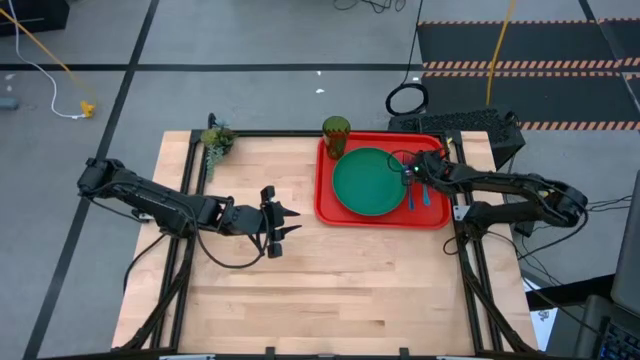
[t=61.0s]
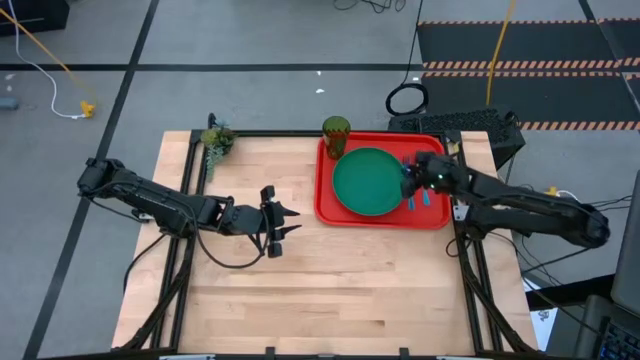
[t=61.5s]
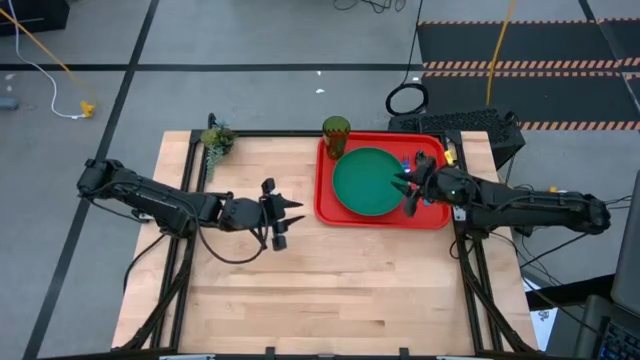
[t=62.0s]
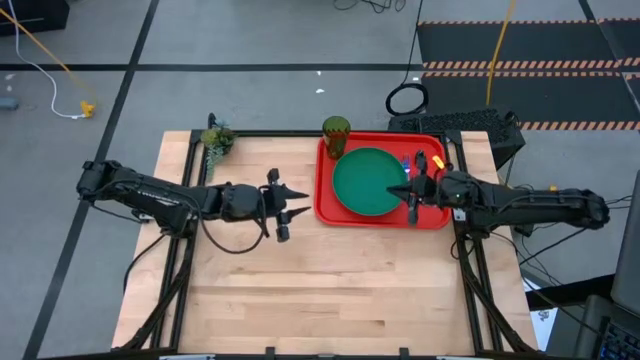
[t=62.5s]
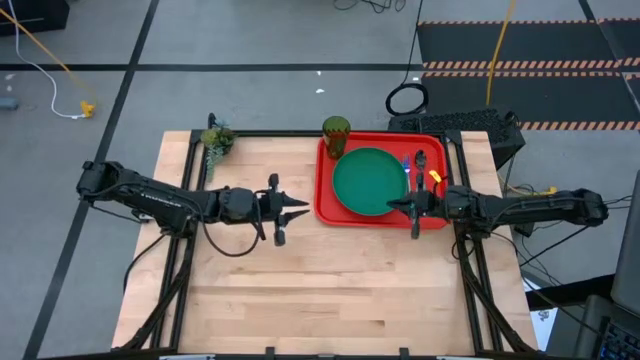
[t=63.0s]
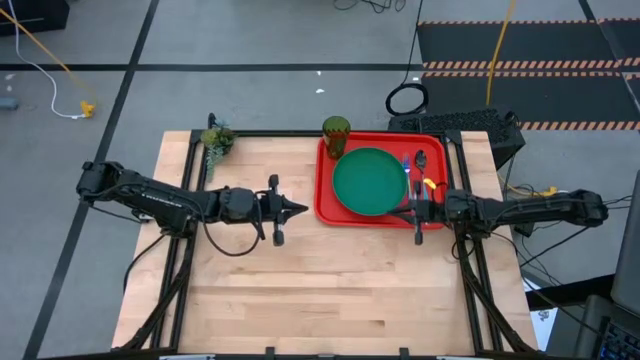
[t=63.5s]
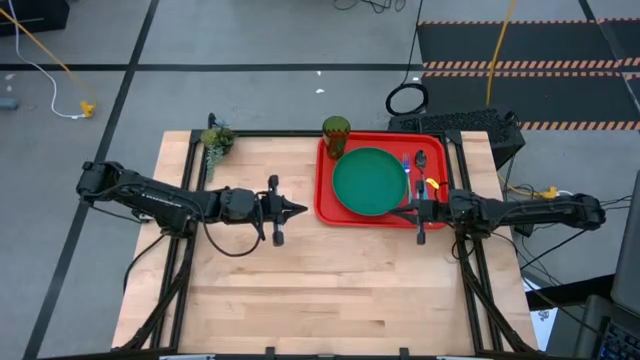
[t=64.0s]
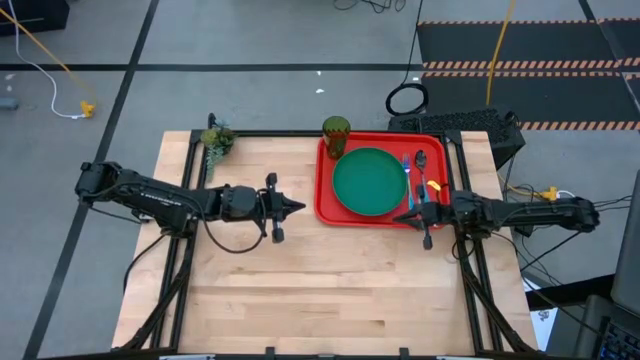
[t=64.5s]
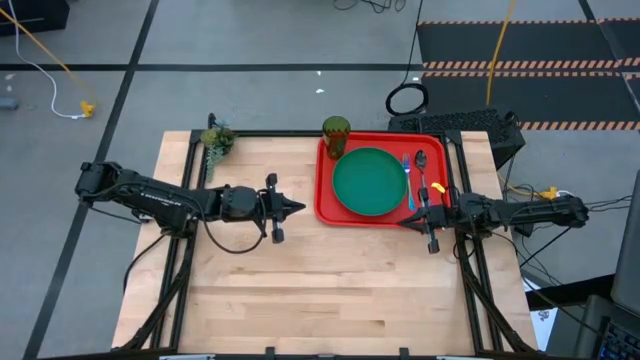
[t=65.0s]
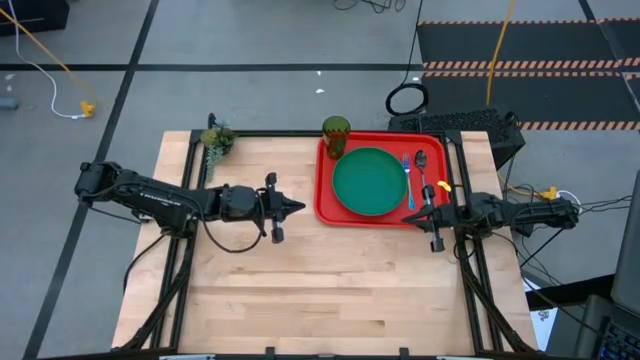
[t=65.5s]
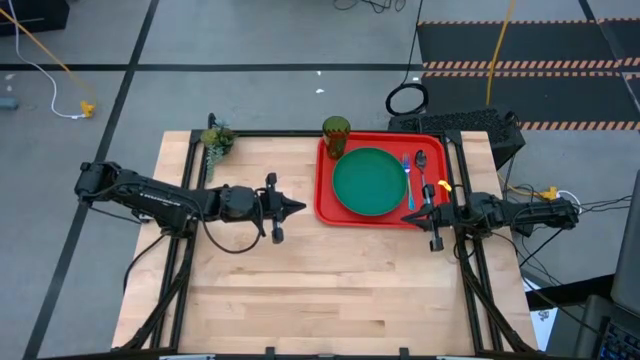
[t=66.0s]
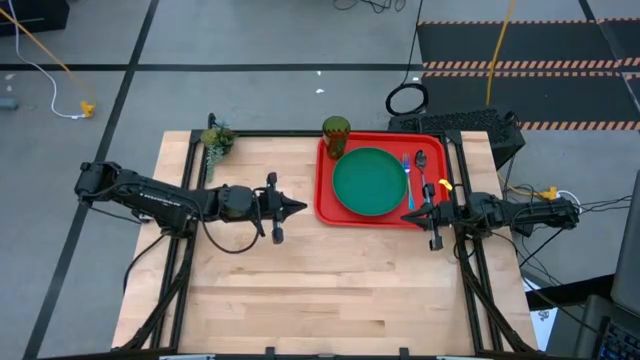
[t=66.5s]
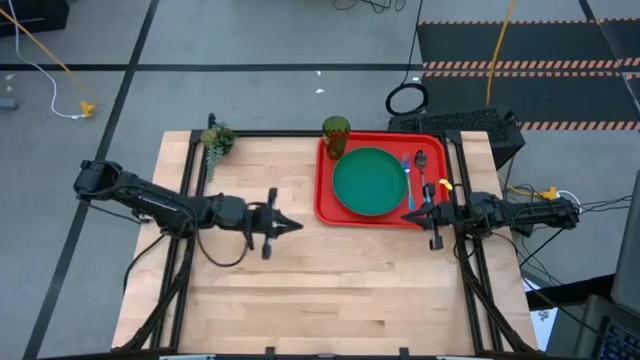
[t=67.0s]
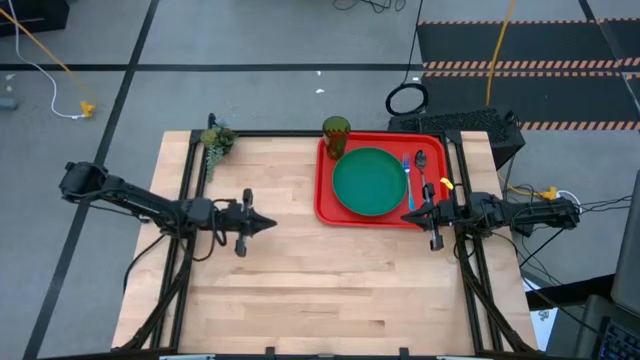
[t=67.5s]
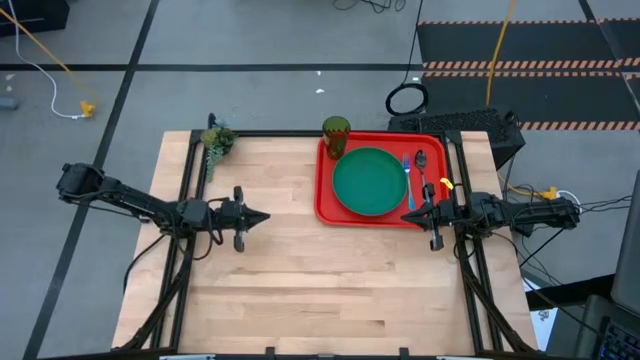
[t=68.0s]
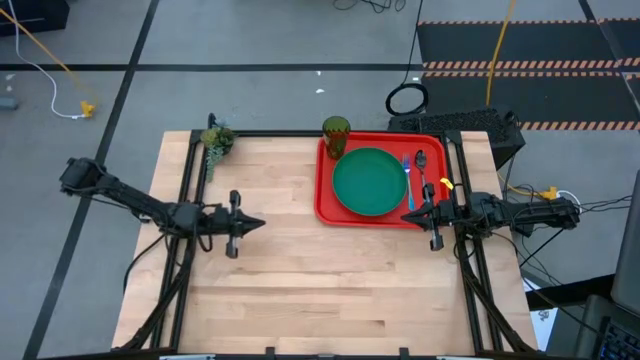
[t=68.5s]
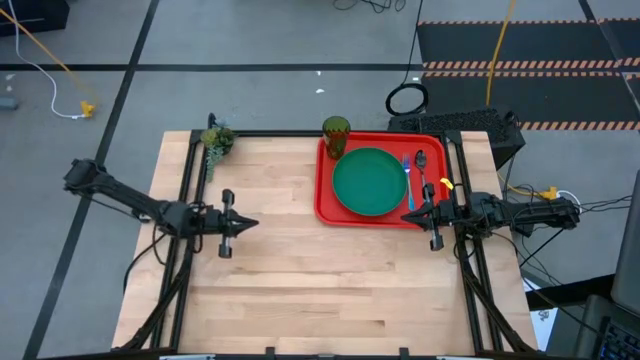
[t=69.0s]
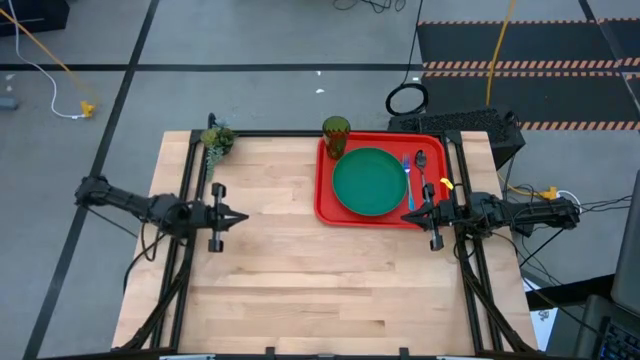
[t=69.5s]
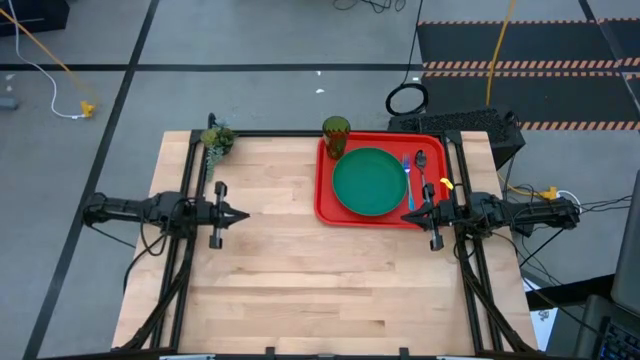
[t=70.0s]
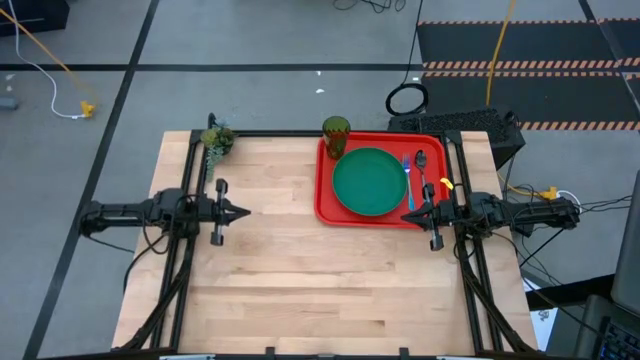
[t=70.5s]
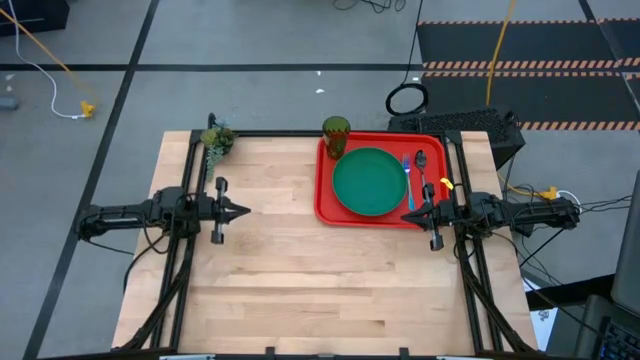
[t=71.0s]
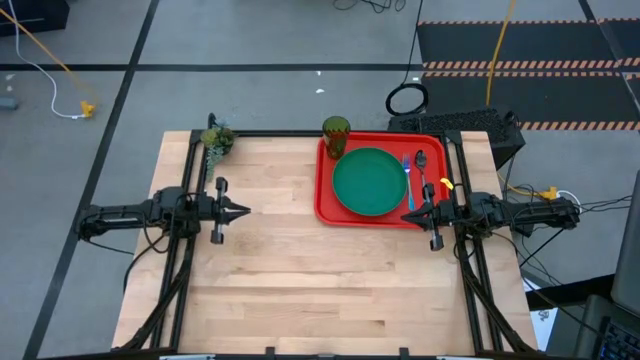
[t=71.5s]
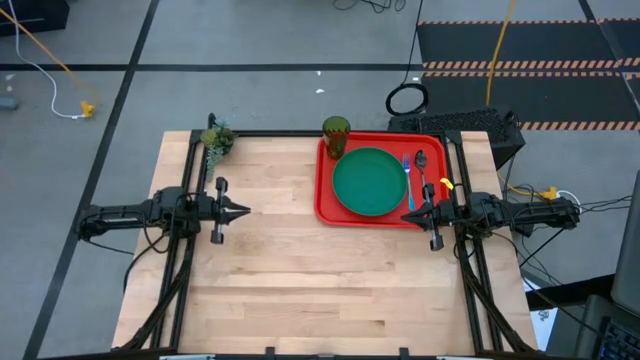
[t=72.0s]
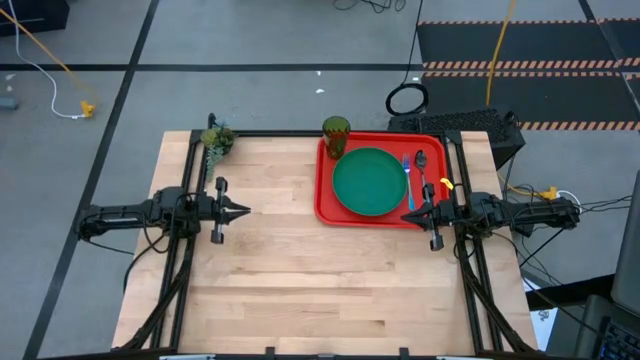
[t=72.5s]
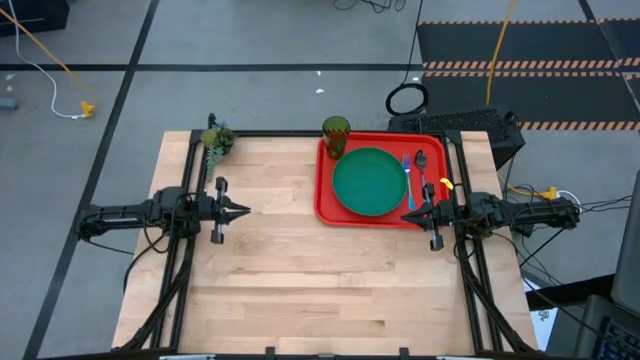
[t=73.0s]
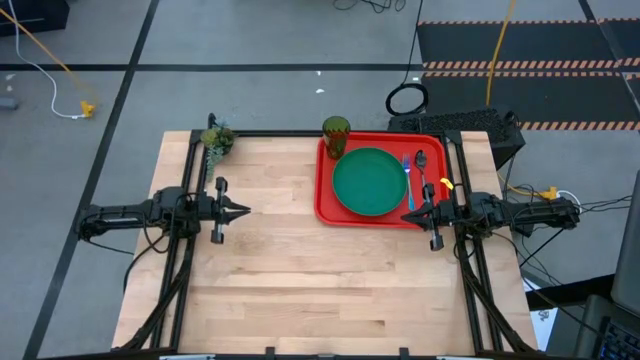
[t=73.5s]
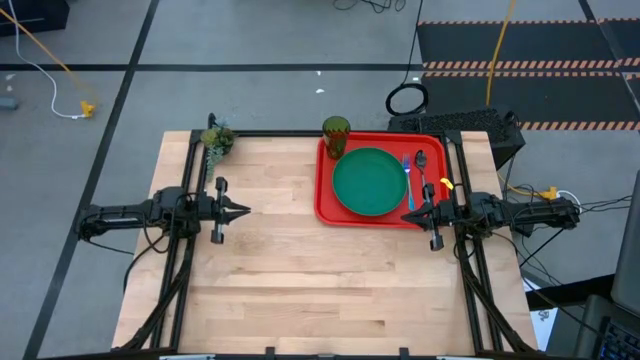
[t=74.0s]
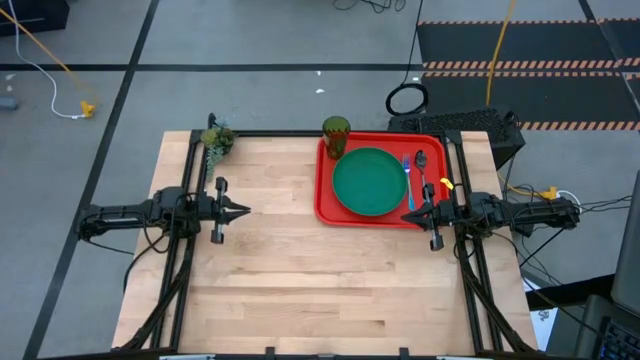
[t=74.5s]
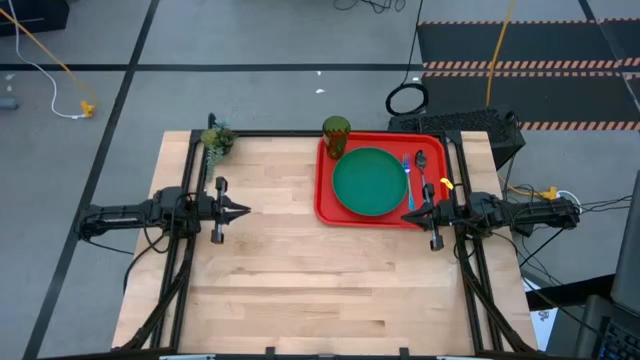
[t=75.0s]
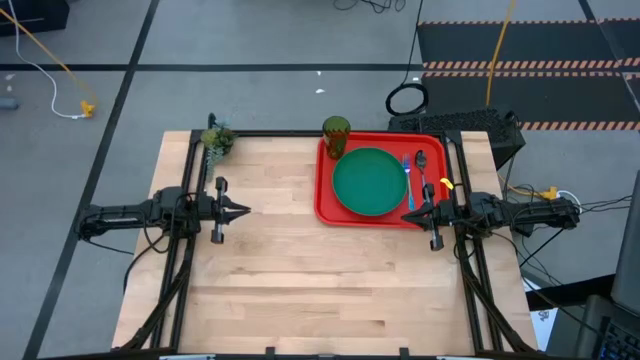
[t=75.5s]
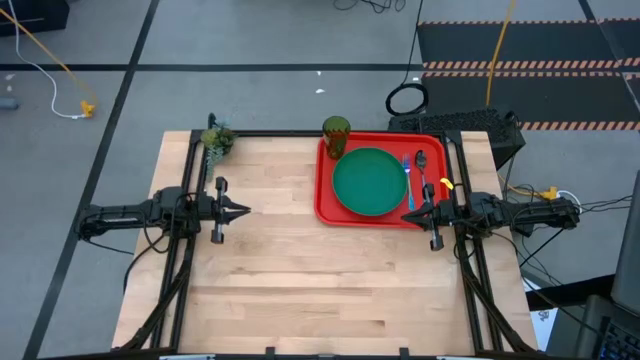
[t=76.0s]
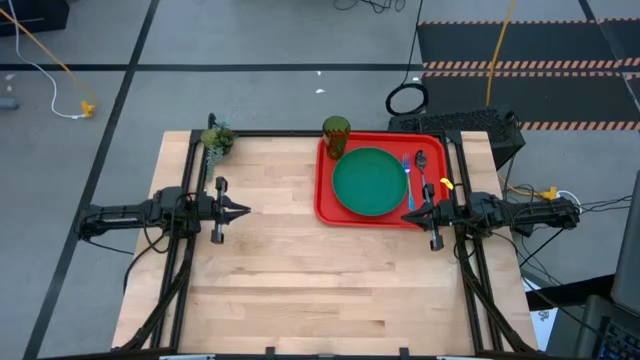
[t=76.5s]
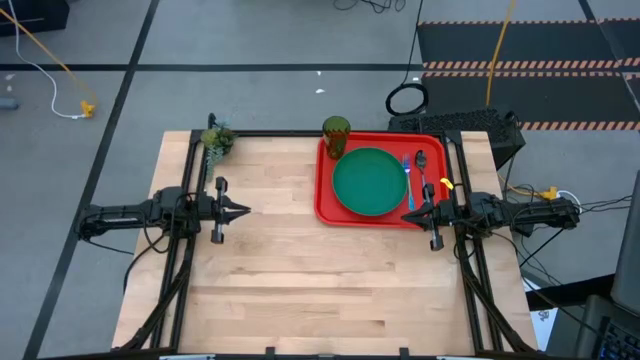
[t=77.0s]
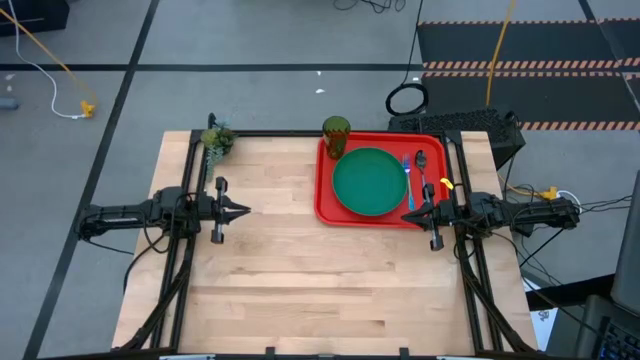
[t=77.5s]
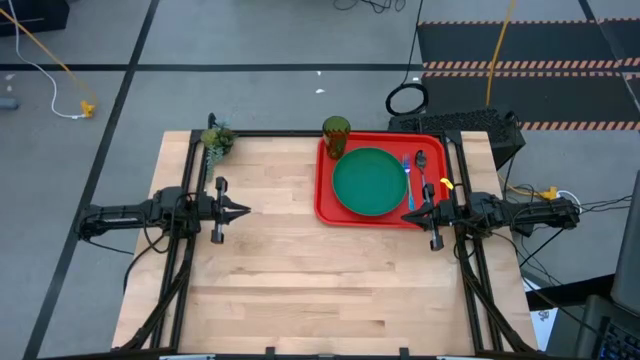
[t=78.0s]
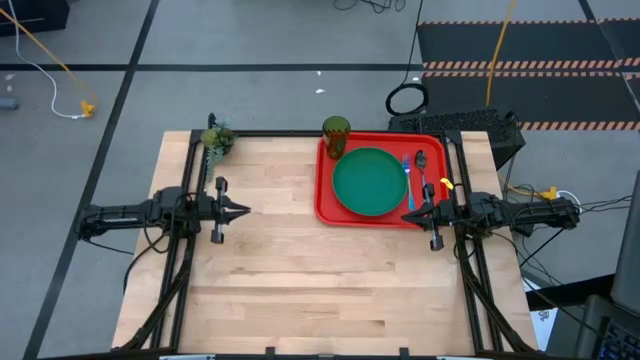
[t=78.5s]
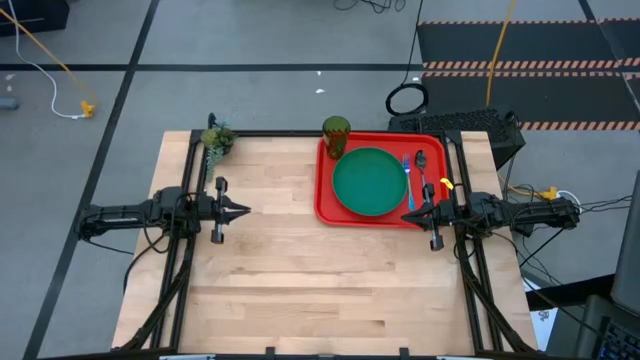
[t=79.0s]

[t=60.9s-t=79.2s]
Task: Pick and place plate/cup/fork/spoon on tray
Return to Home Position

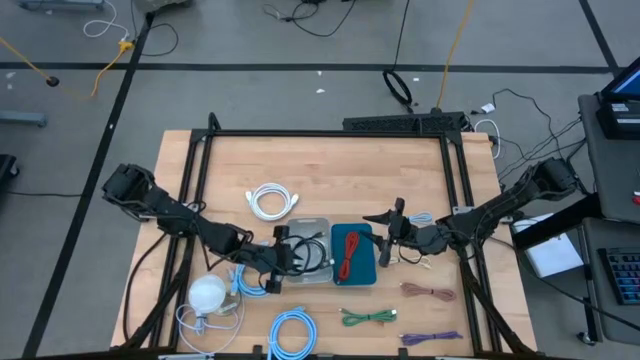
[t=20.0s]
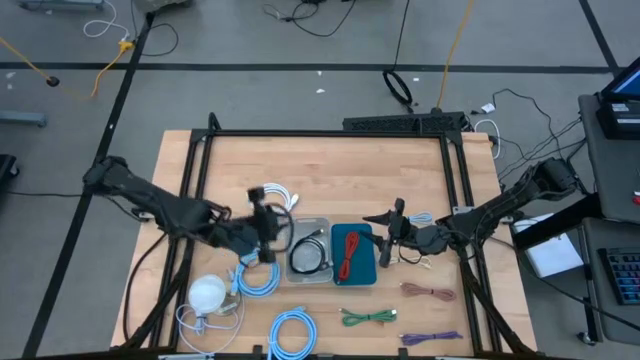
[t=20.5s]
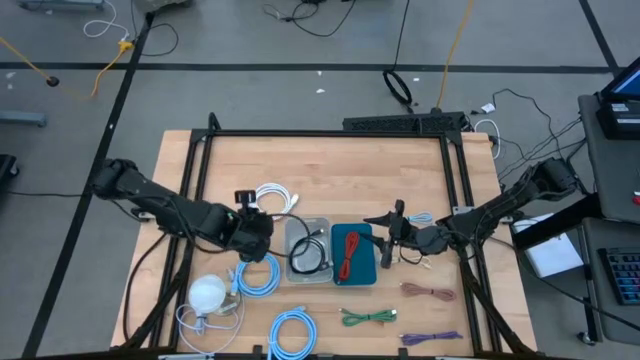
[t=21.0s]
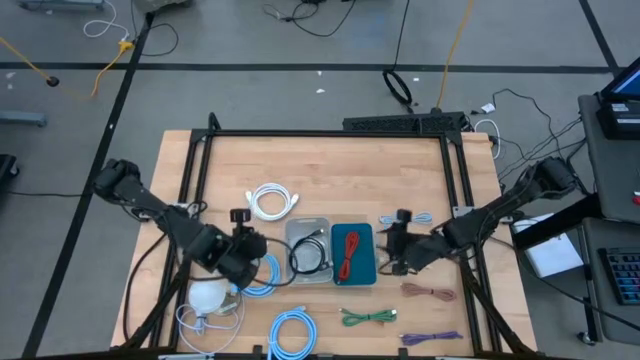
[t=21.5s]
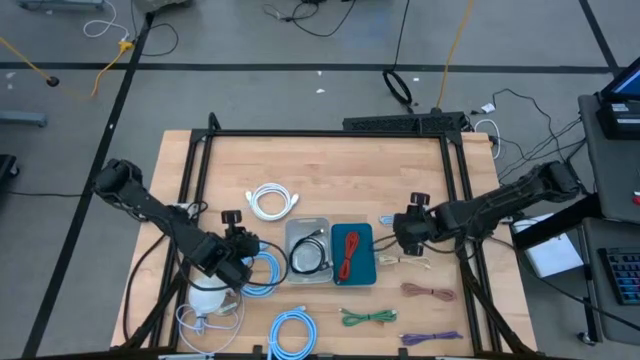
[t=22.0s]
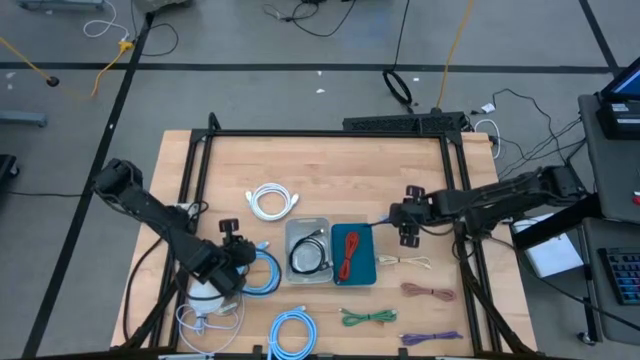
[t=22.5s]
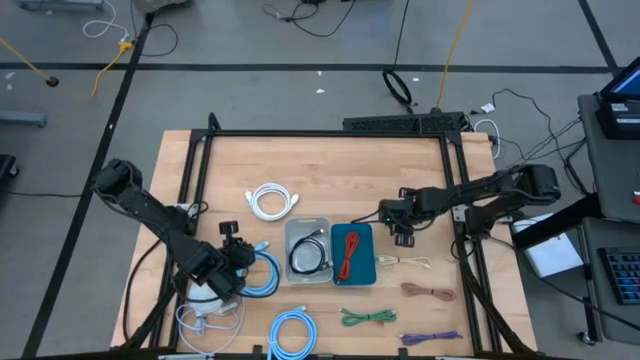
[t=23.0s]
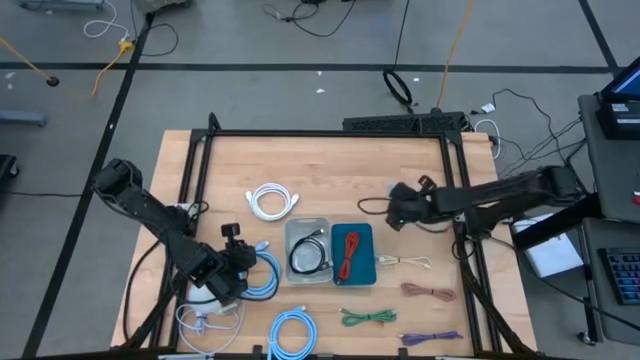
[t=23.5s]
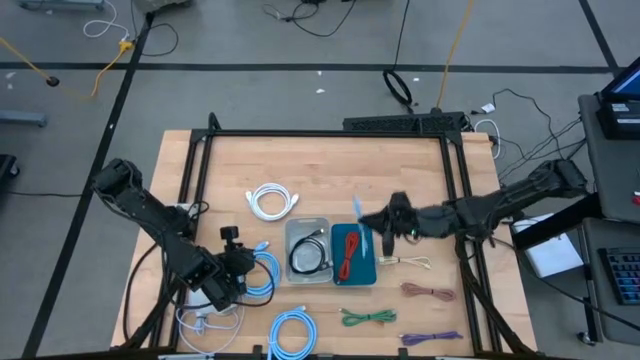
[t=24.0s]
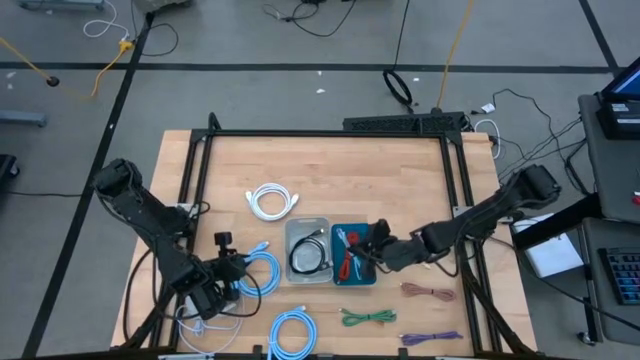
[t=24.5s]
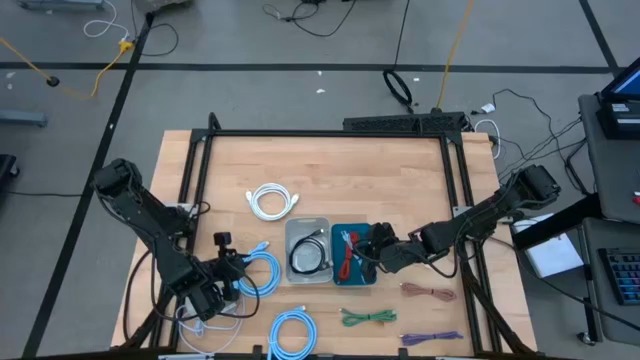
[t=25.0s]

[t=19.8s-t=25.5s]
Task: Pick & Place USB Port
Put the blue charger cable into the blue bin
